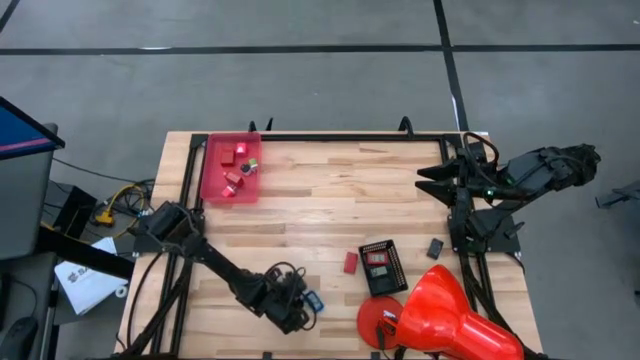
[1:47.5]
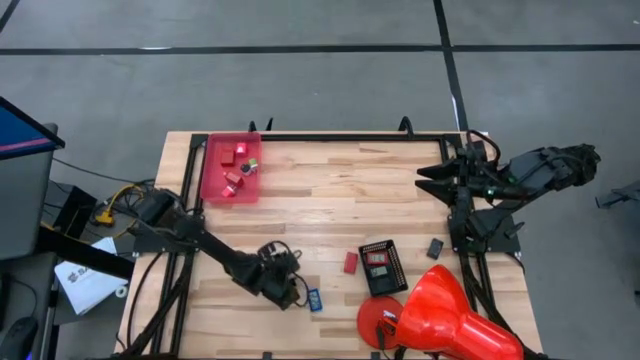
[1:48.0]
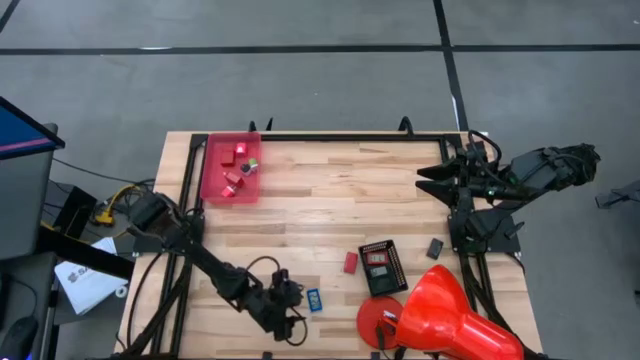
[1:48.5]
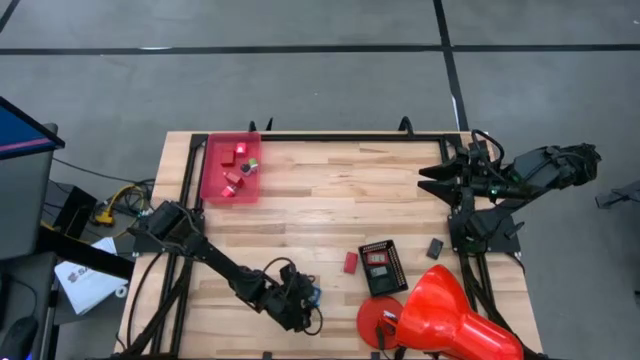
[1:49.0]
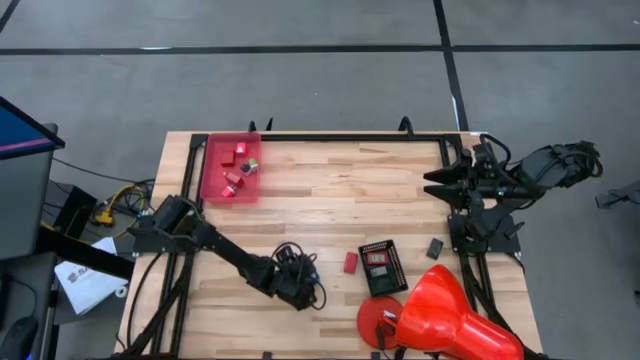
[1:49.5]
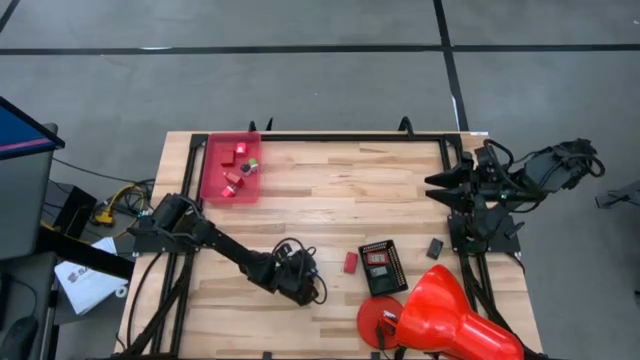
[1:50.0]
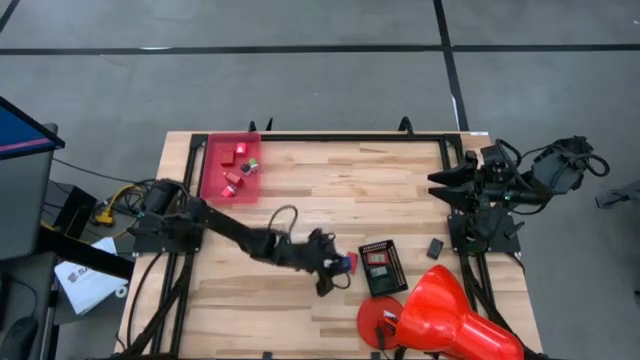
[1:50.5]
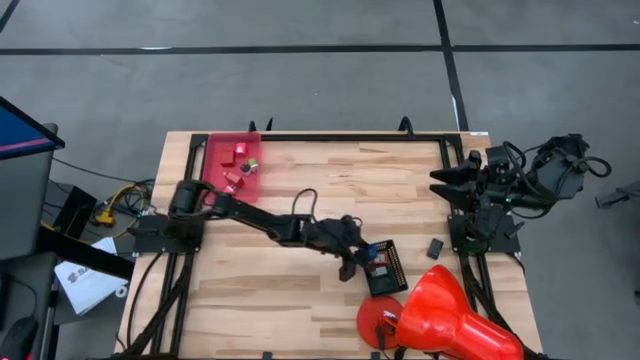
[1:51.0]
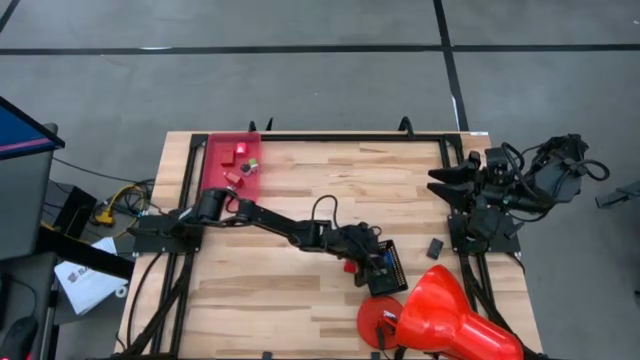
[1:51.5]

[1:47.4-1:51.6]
Task: Pick & Place Office items
Put the blue digital timer into the black bin

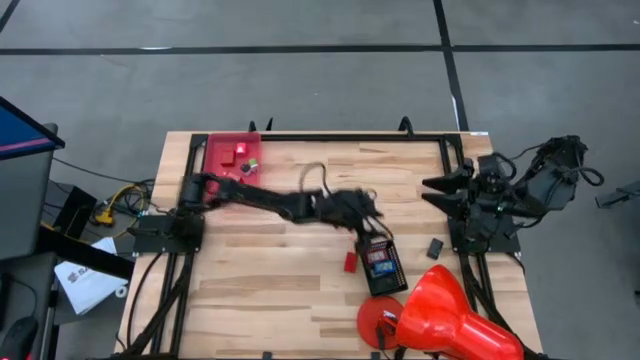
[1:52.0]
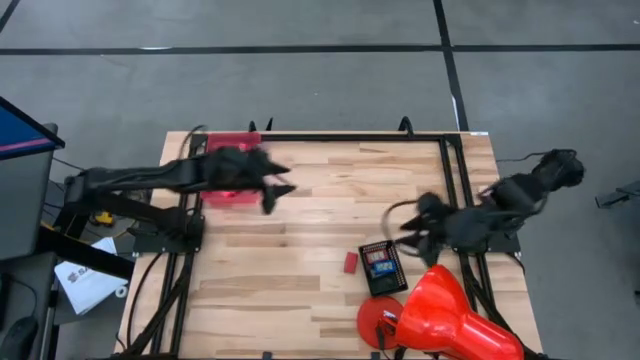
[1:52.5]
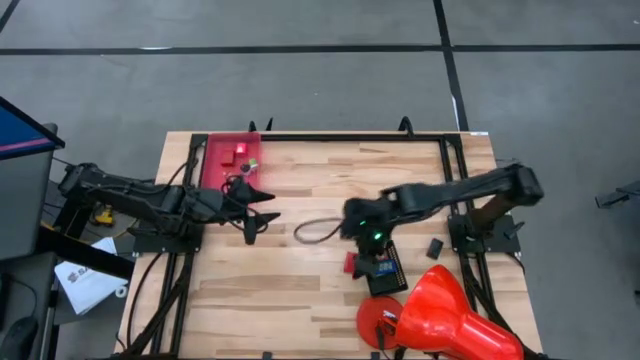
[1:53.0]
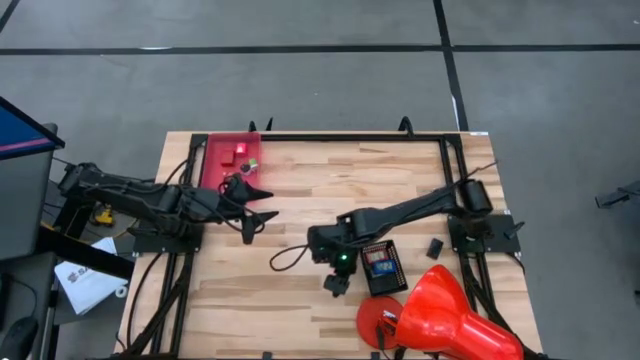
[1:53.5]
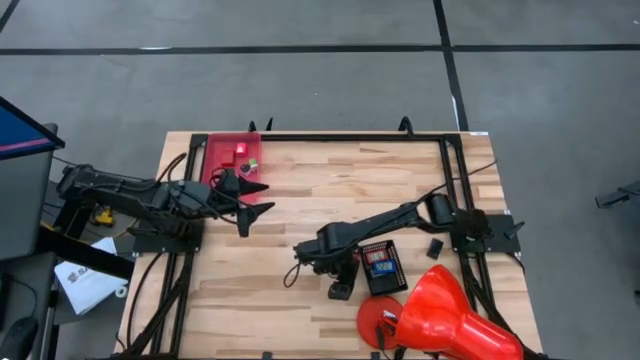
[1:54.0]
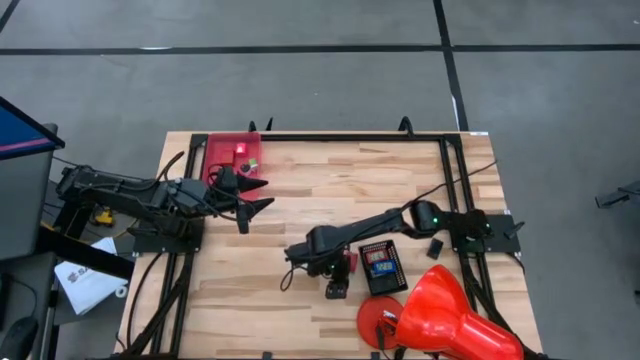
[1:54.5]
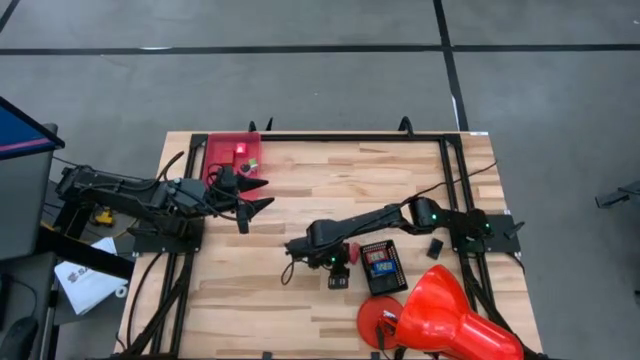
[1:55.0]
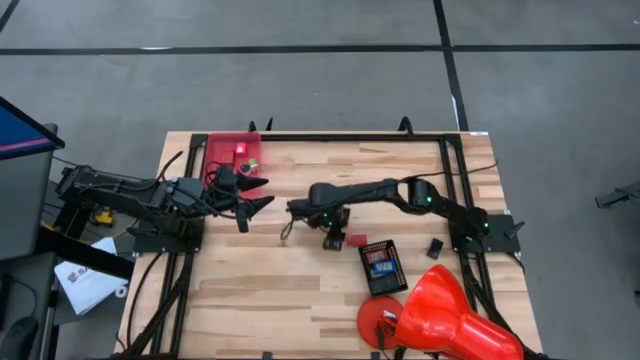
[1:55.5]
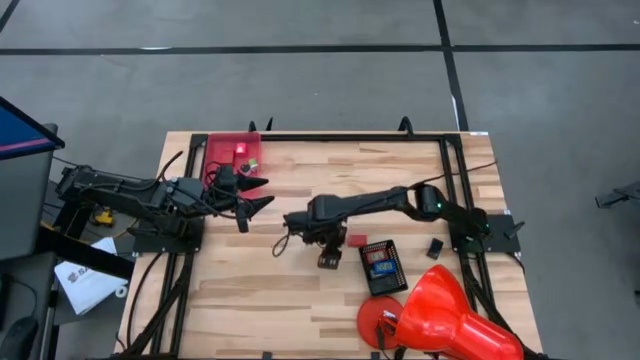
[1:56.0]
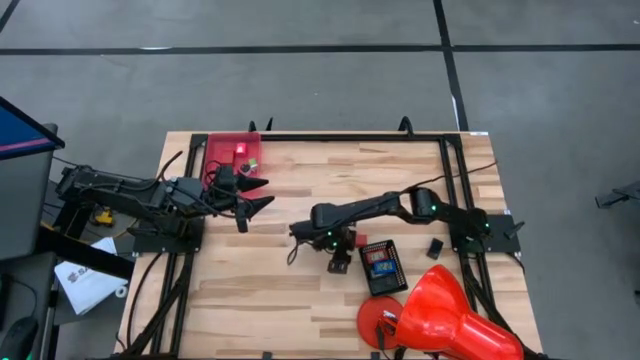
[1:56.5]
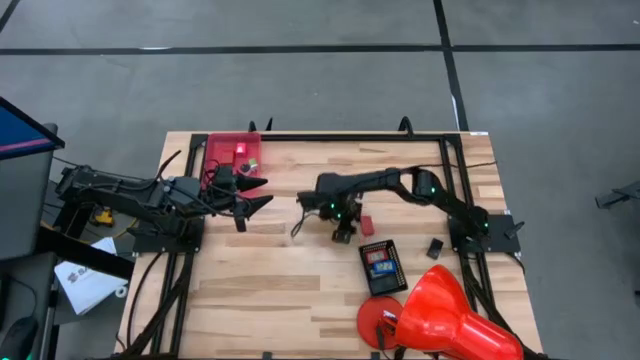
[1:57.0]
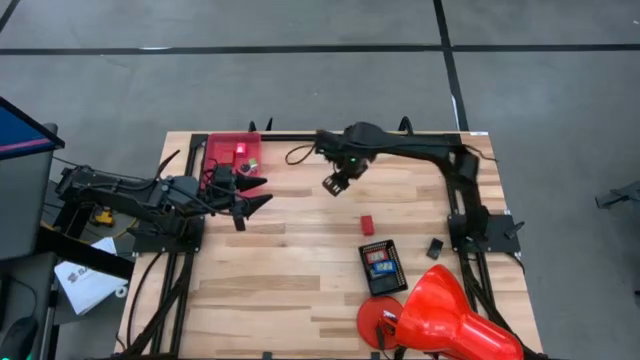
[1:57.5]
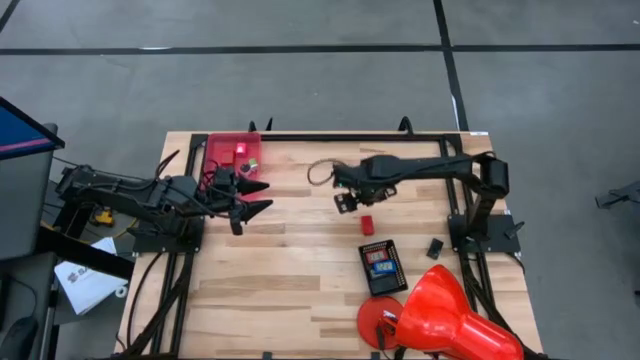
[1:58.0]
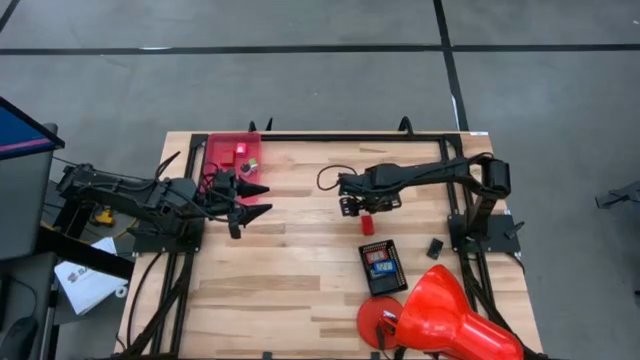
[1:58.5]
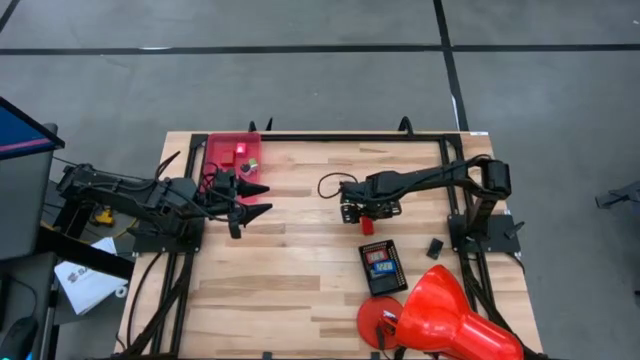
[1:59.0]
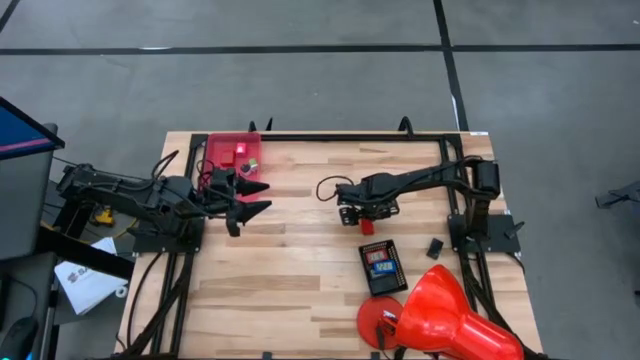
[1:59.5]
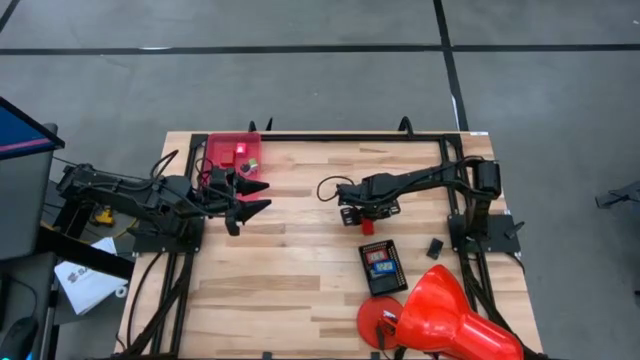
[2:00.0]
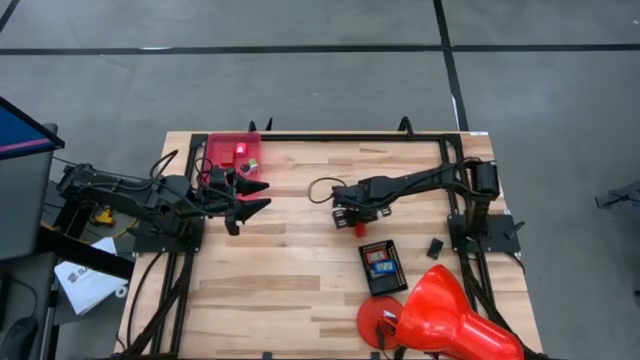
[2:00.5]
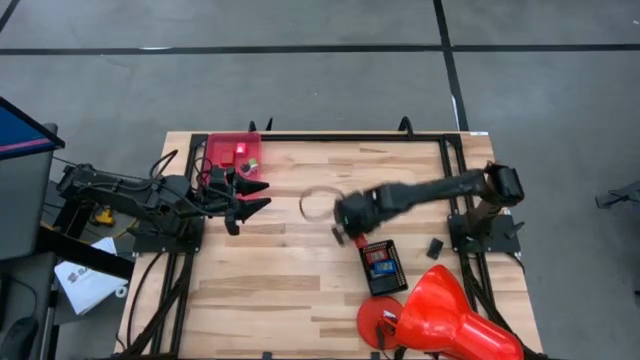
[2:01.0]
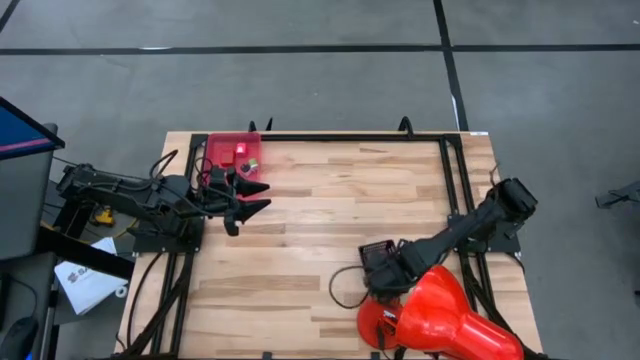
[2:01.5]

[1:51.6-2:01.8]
Put the red digital timer into the black bin

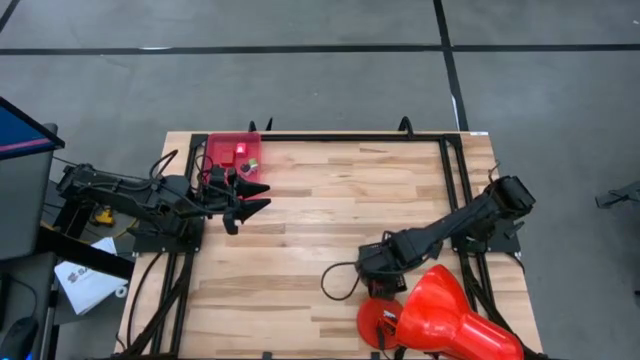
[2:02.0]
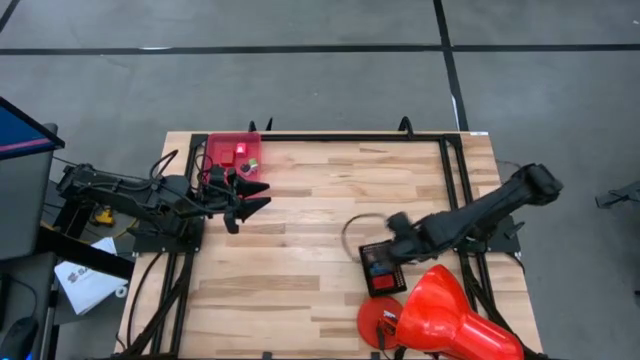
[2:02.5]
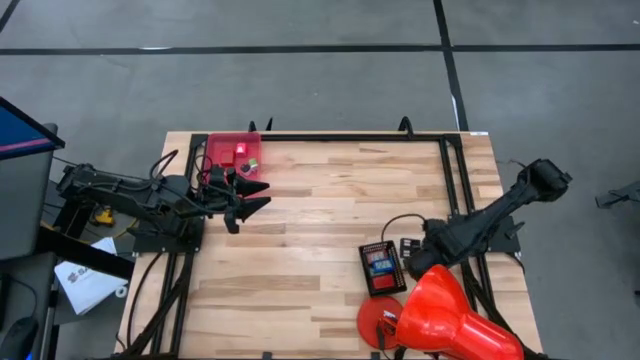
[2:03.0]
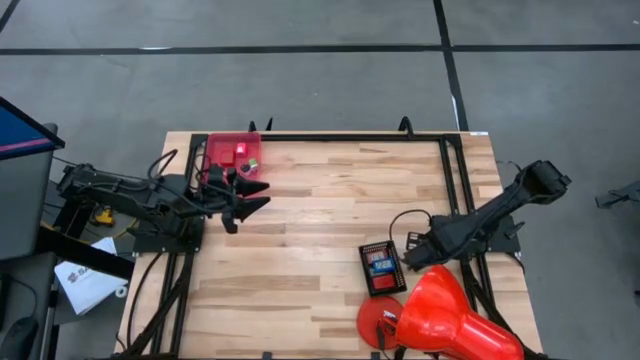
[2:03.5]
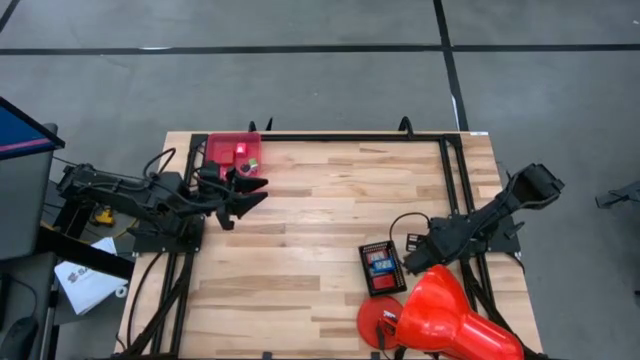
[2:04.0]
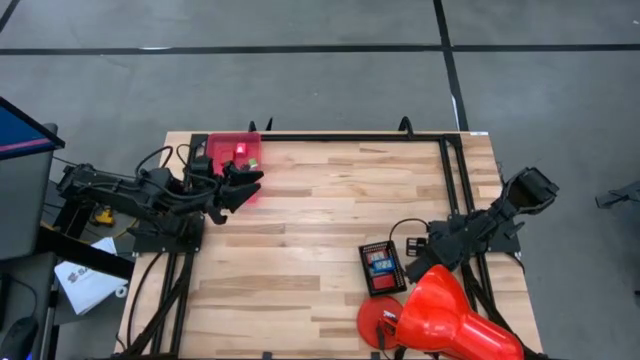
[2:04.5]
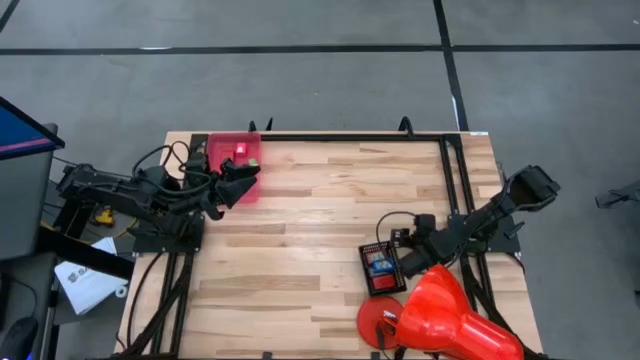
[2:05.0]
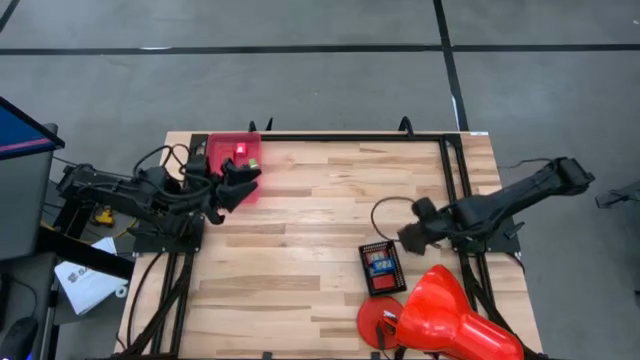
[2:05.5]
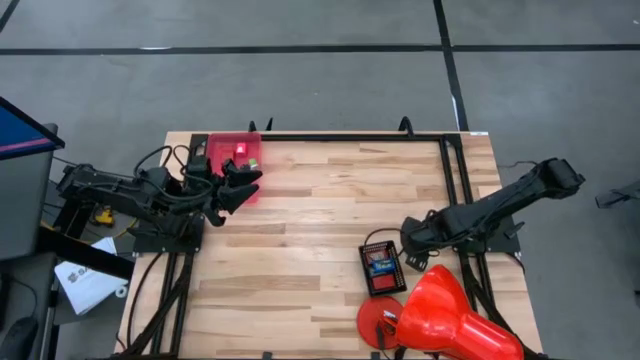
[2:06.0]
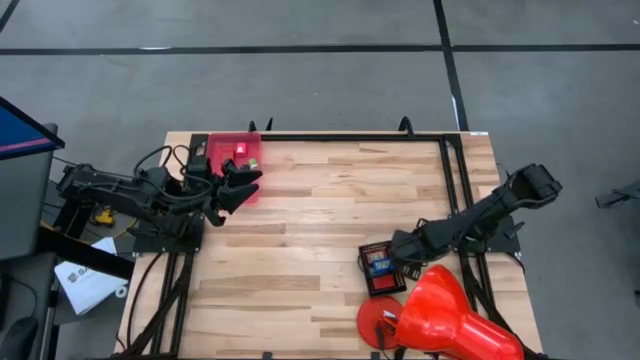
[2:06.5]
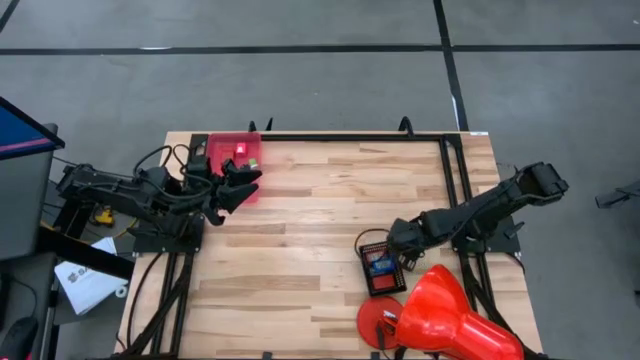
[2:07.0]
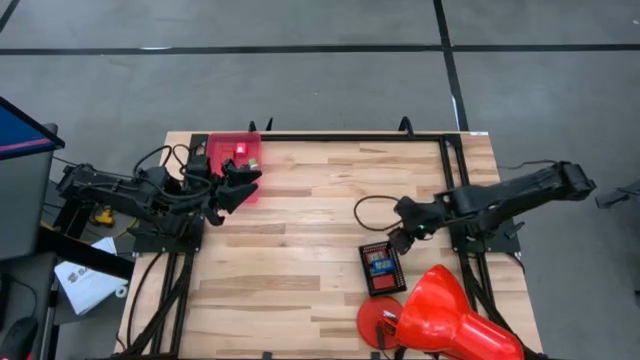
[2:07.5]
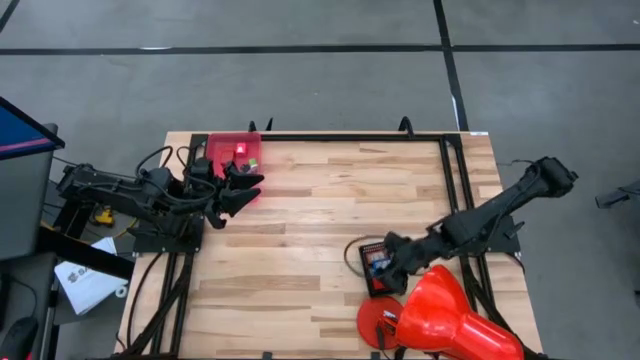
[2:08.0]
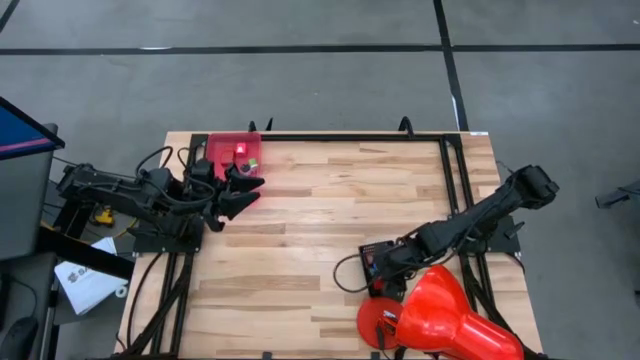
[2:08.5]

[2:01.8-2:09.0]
Put the black digital timer into the black bin
